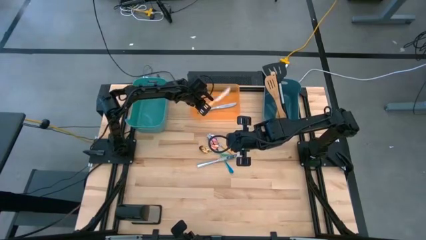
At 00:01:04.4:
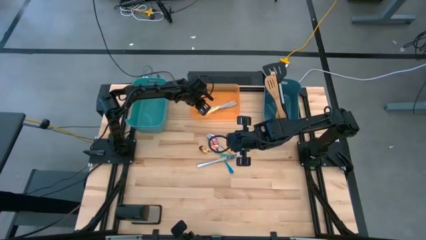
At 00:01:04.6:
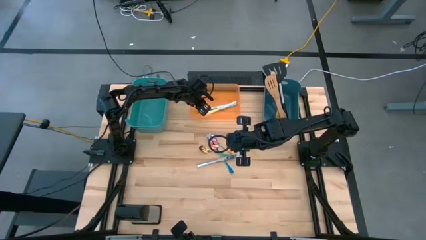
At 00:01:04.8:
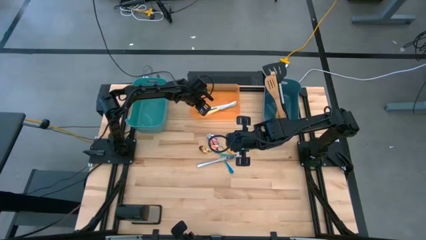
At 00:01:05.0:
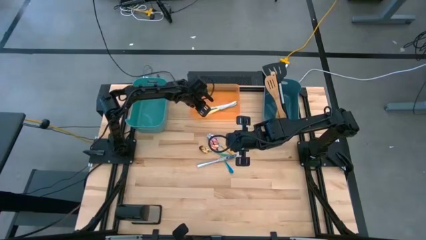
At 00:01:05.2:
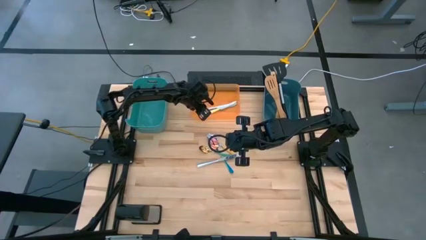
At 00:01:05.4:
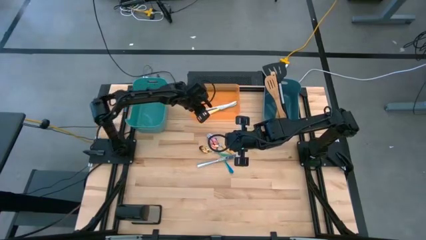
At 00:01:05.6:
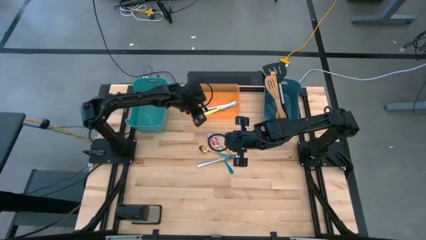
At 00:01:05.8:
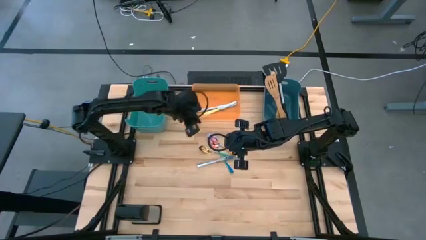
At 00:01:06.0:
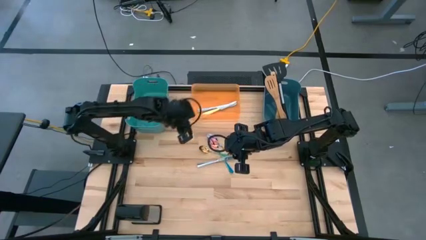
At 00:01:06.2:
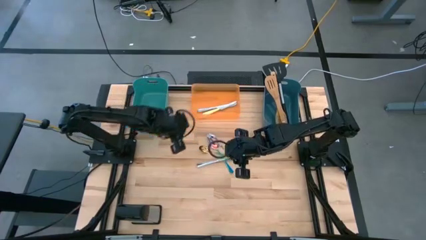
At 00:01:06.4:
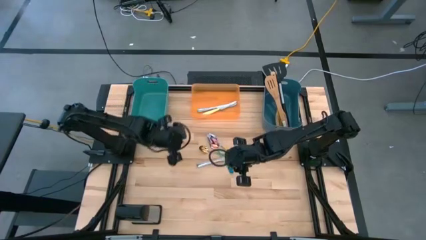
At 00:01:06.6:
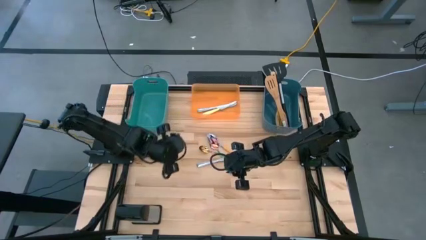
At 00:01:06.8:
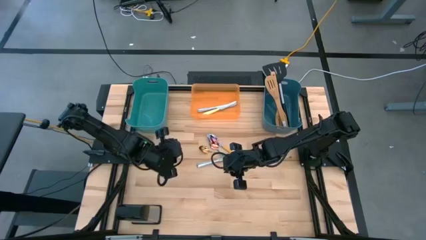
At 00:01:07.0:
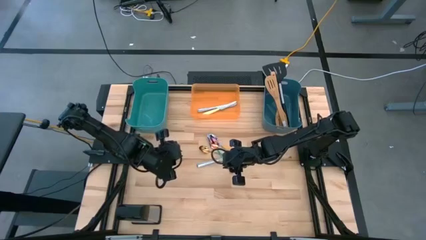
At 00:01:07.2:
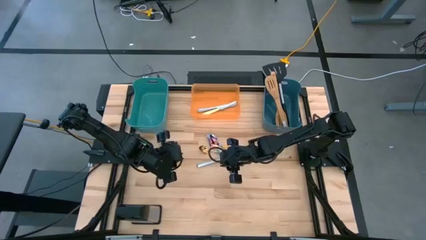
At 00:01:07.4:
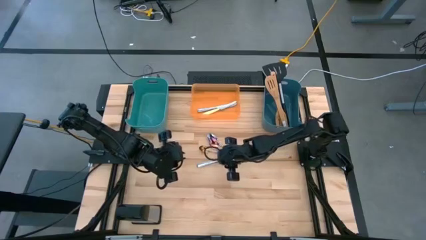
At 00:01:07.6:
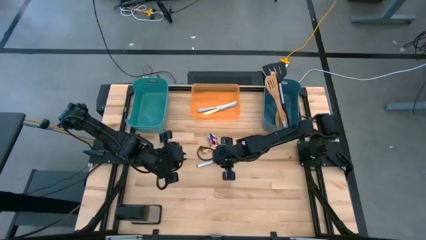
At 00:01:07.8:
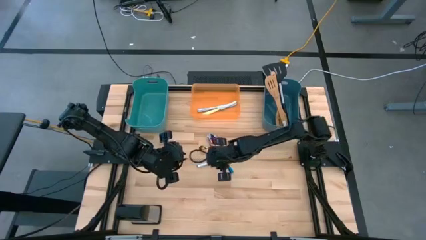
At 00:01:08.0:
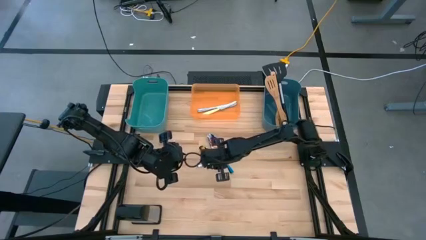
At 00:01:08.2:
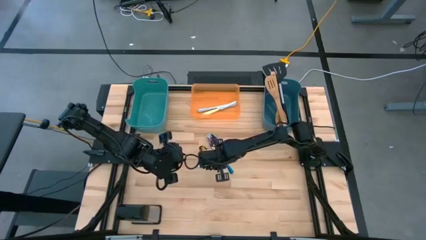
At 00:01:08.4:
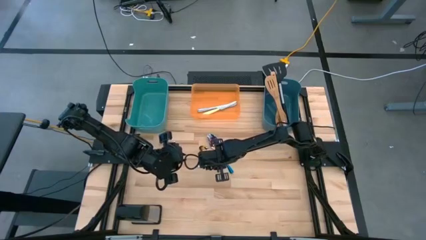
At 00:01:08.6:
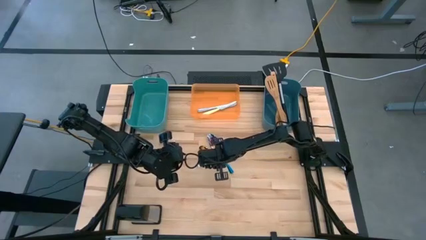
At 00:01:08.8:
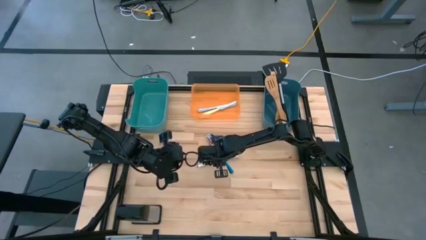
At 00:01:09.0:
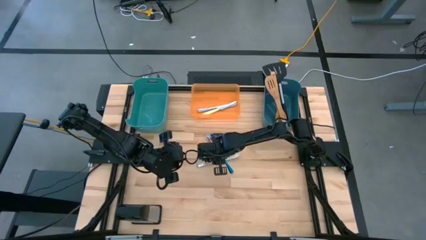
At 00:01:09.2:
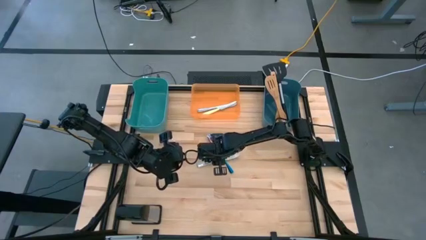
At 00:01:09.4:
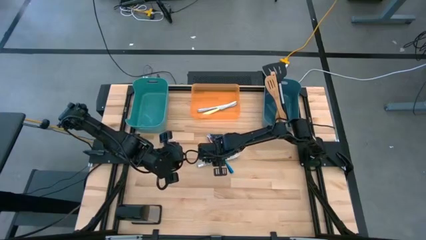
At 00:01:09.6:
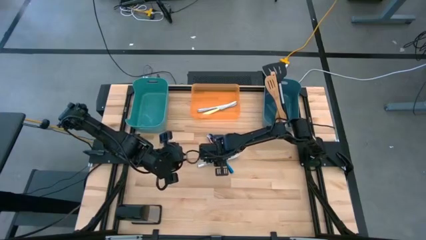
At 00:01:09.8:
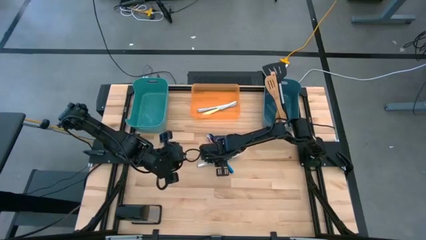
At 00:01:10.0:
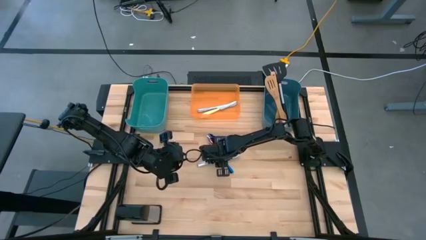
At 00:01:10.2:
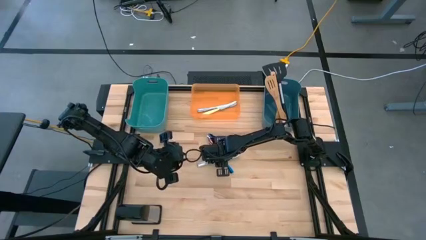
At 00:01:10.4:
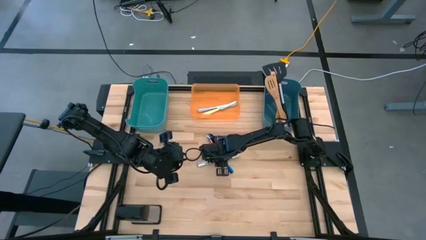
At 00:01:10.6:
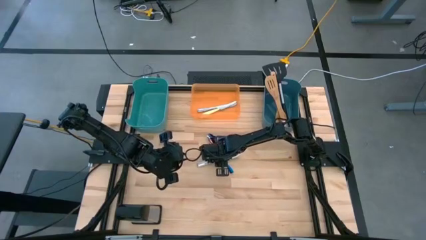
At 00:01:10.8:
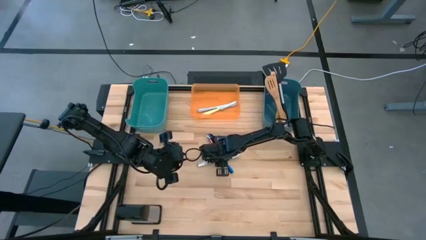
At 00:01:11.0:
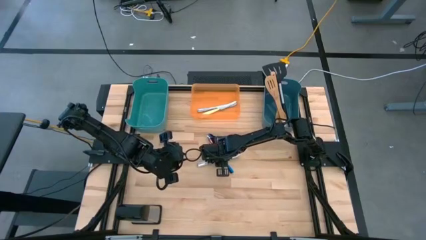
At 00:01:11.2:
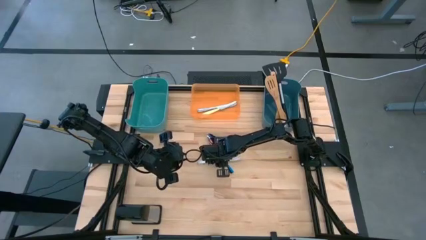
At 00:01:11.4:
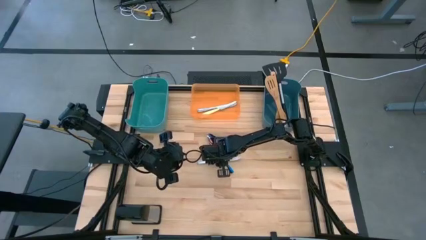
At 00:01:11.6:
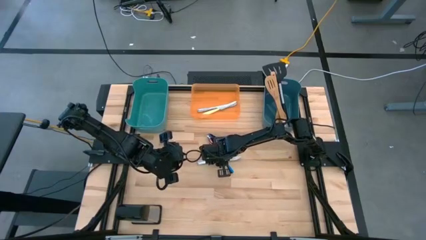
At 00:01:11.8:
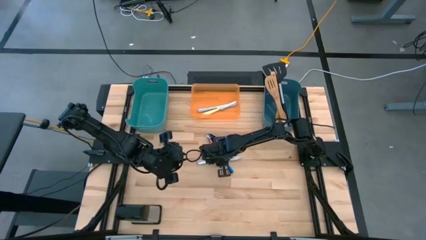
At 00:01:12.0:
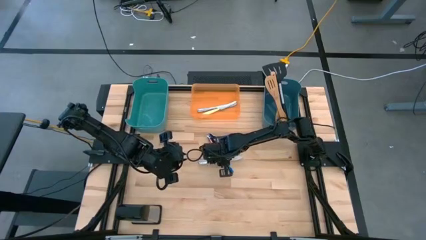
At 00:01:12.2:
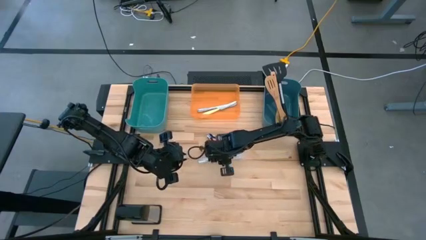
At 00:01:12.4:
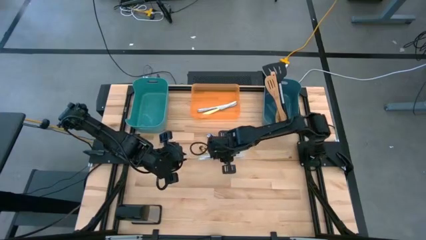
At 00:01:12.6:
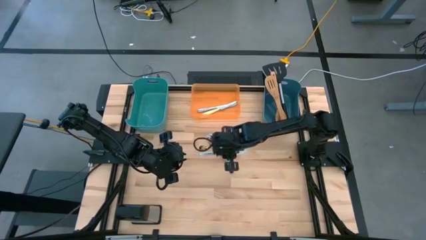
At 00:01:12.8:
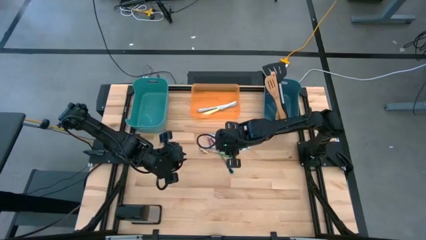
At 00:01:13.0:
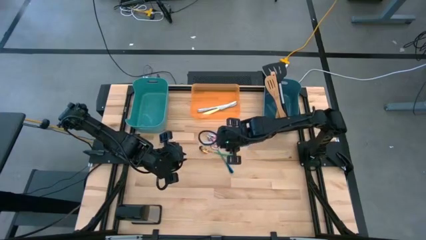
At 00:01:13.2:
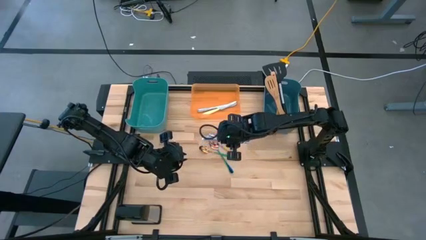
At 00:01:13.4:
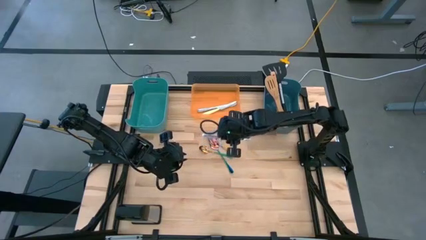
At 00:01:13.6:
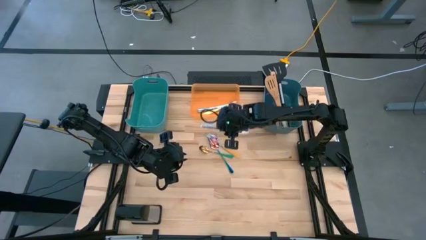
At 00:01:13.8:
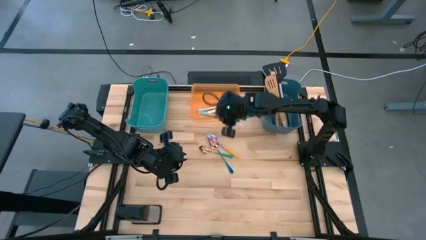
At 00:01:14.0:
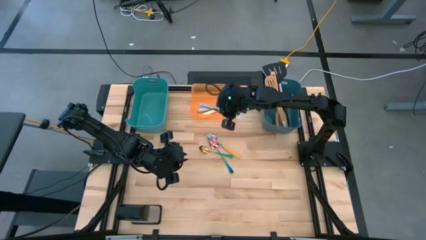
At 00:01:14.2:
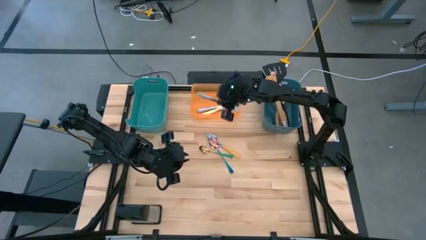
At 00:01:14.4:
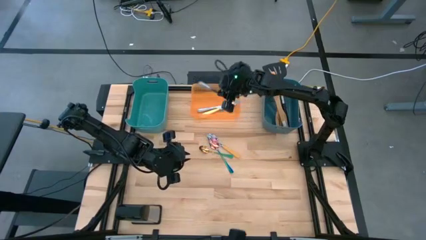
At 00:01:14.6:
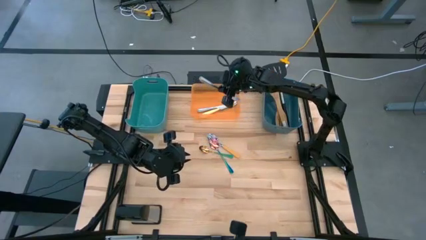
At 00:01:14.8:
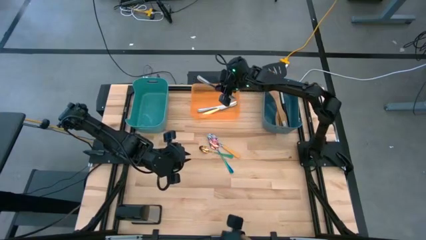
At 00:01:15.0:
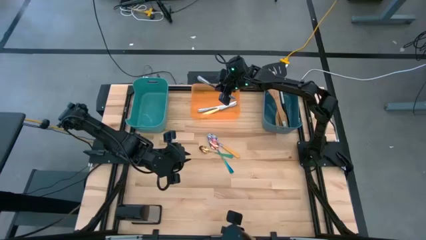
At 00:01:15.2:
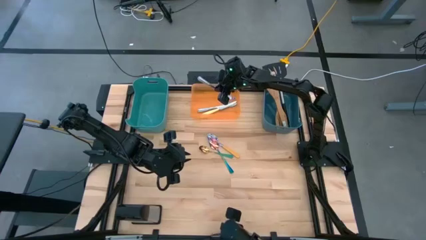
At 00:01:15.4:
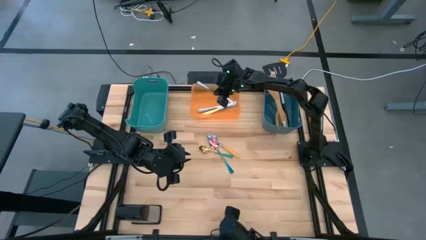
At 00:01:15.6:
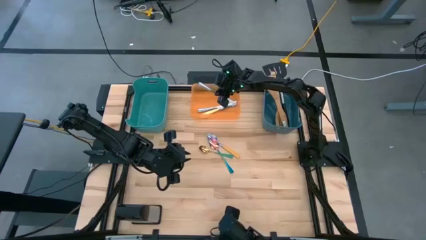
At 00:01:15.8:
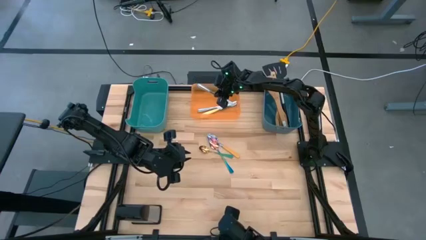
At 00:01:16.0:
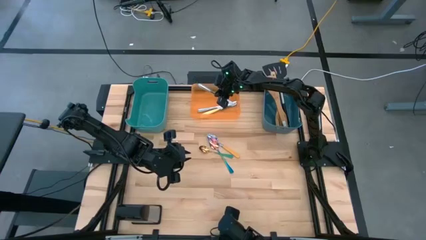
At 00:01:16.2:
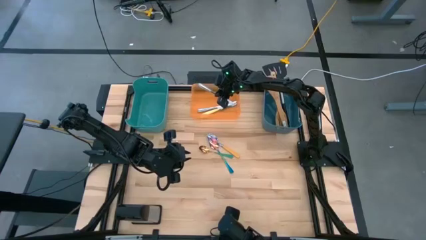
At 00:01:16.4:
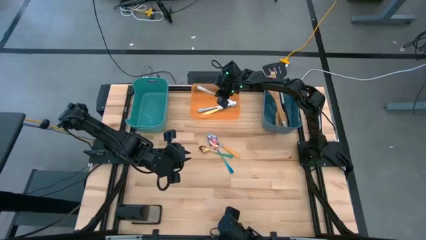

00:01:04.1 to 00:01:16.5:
Task: Pick & Place Kitchen Items
Put the silver knife into the orange bin

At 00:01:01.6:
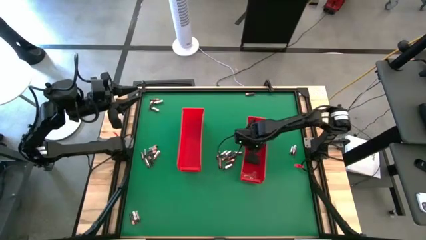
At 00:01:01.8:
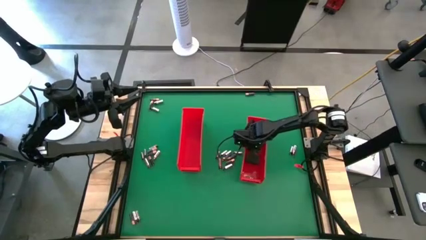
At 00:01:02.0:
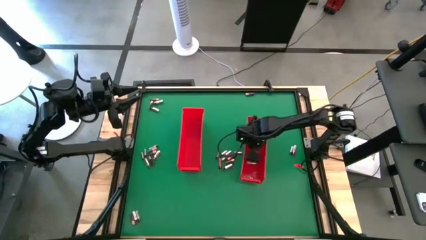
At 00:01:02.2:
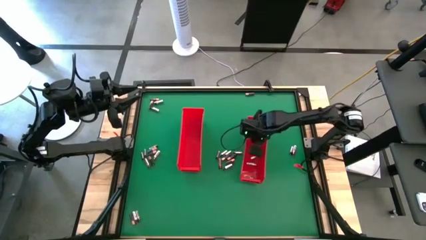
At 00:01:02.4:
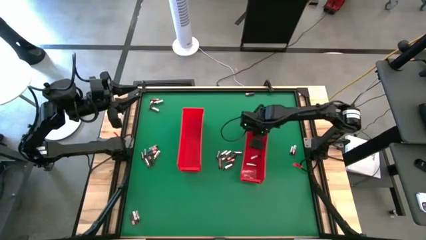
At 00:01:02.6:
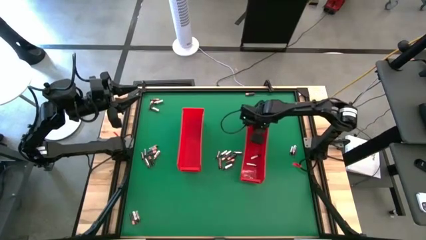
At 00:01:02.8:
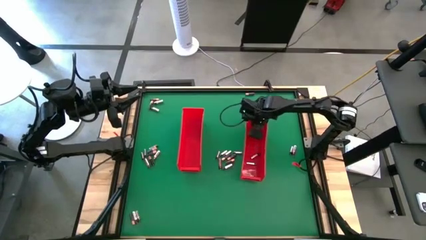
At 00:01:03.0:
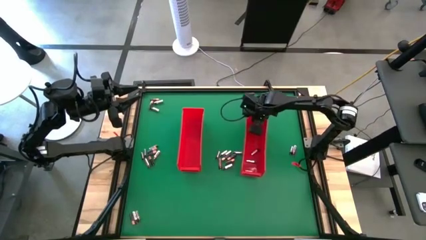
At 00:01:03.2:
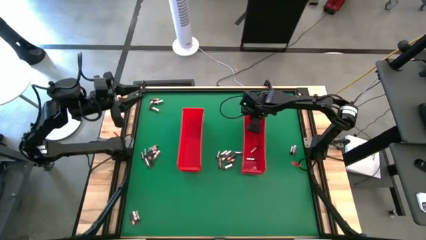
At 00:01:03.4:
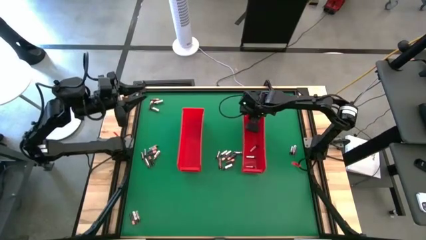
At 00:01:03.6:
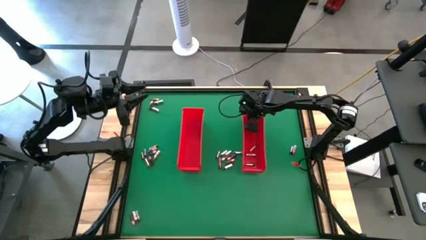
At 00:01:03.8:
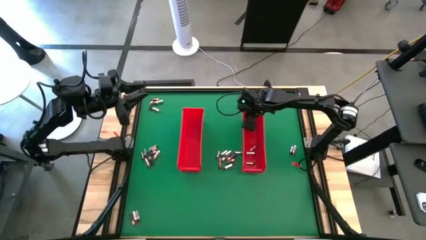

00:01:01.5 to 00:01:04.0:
Task: Sort batteries
Adjust the right red bin
